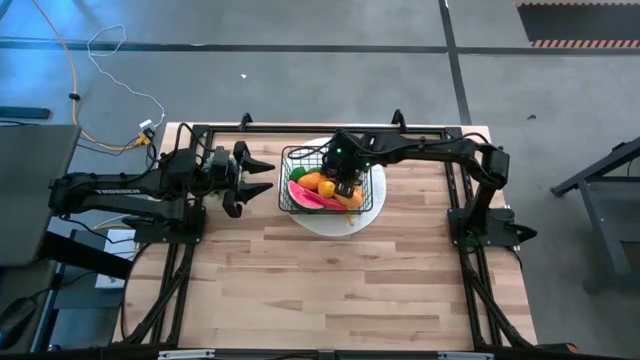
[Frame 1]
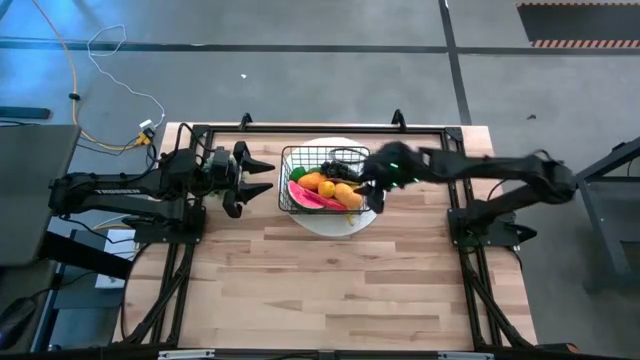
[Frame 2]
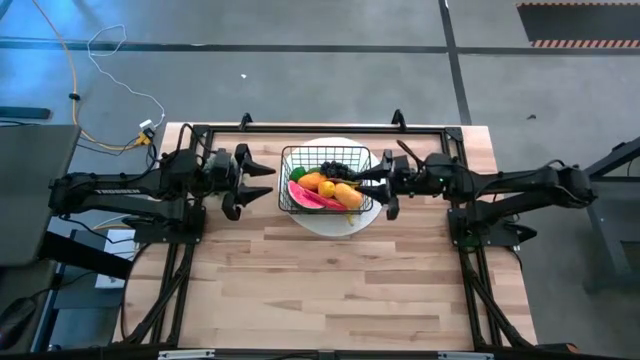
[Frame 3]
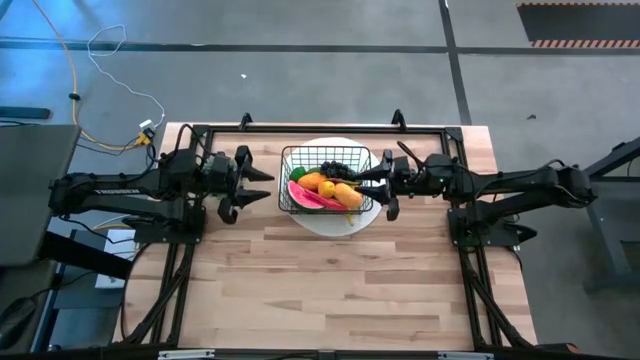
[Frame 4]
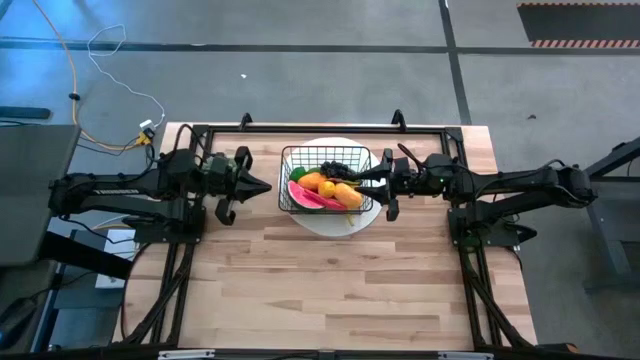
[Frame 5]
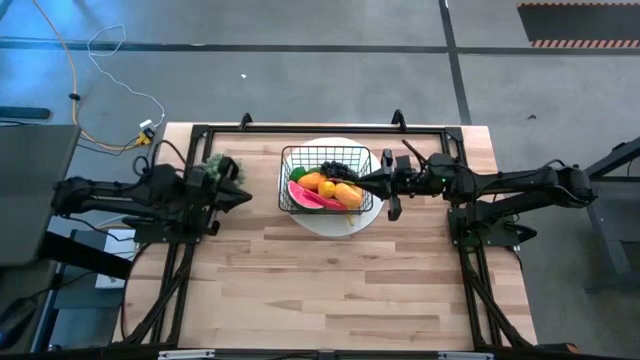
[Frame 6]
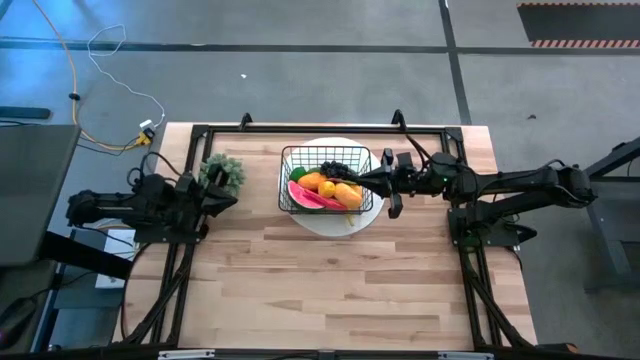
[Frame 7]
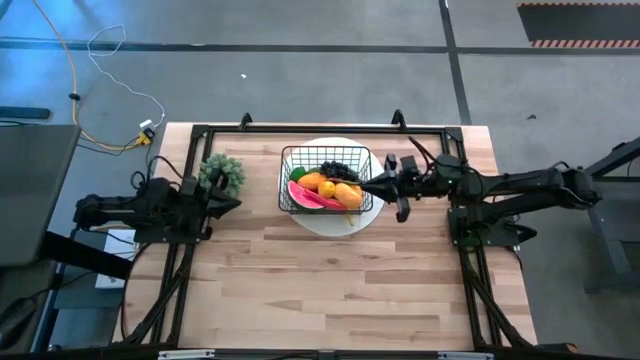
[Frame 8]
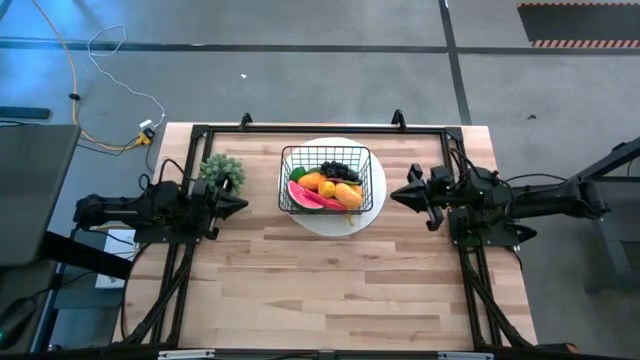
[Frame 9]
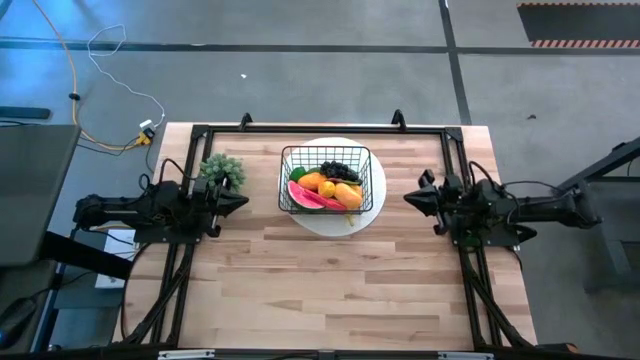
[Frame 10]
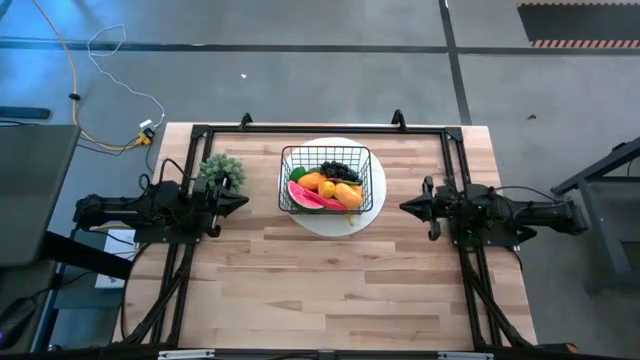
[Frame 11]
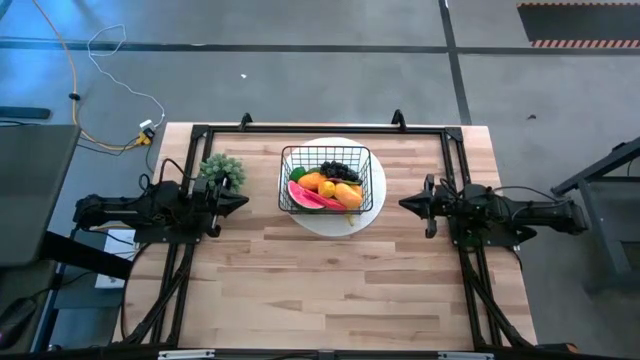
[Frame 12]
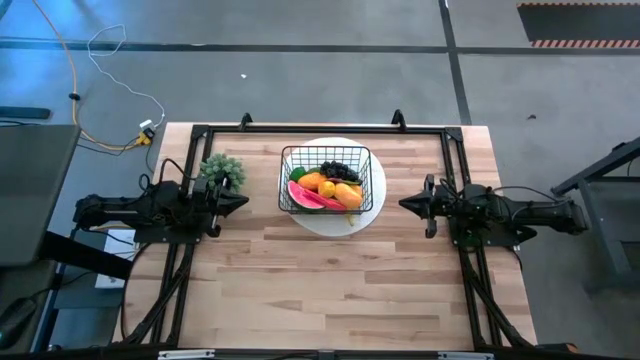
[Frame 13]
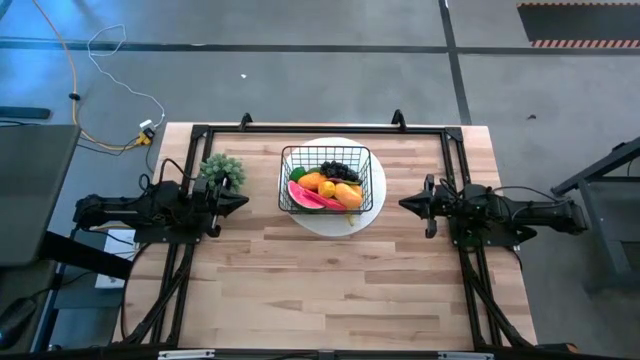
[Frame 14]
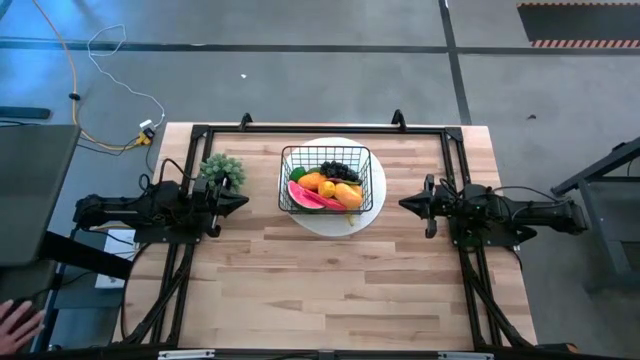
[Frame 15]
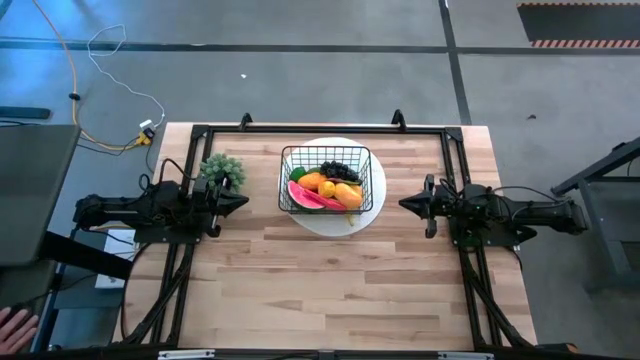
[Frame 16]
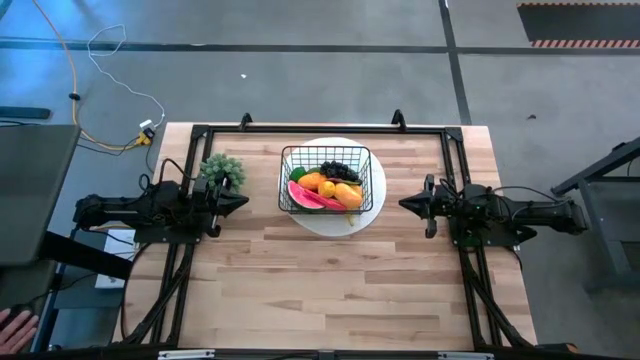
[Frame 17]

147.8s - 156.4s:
Task: Build produce basket
Return to Home Position

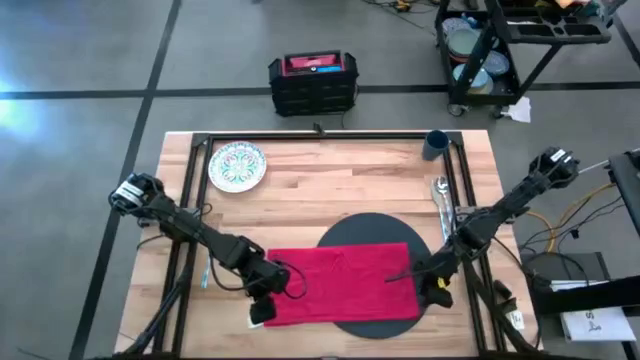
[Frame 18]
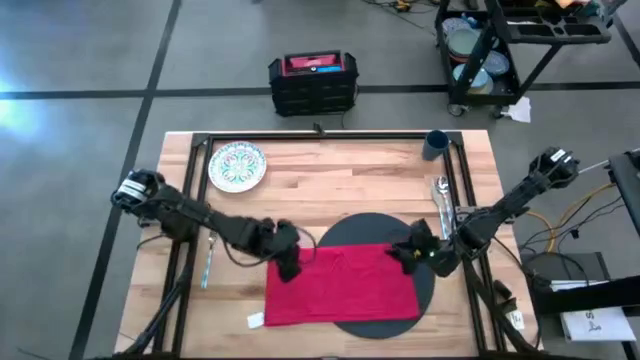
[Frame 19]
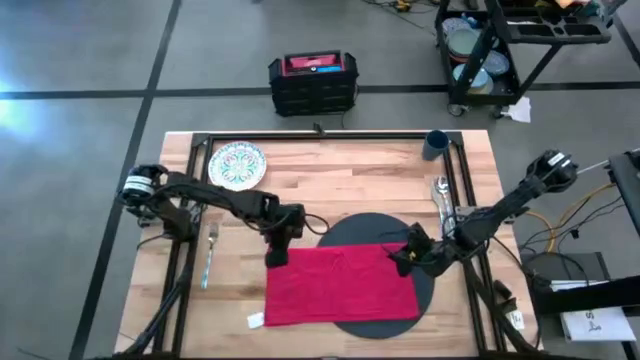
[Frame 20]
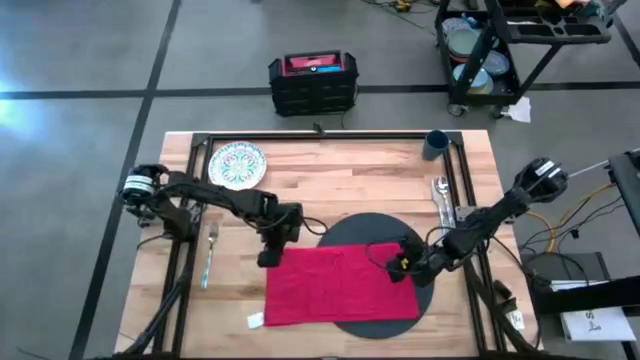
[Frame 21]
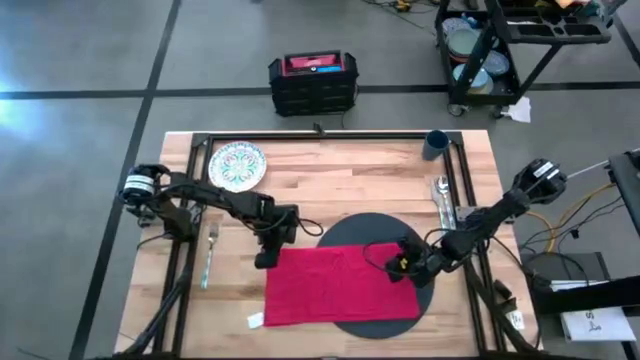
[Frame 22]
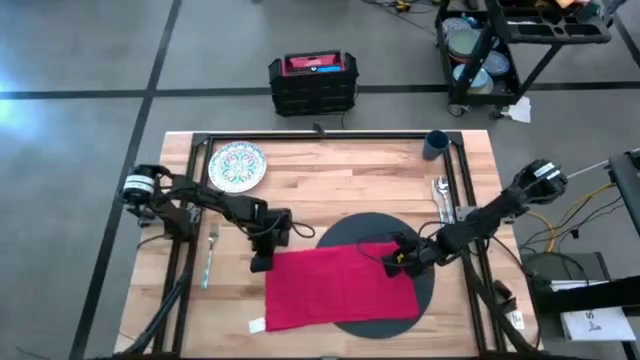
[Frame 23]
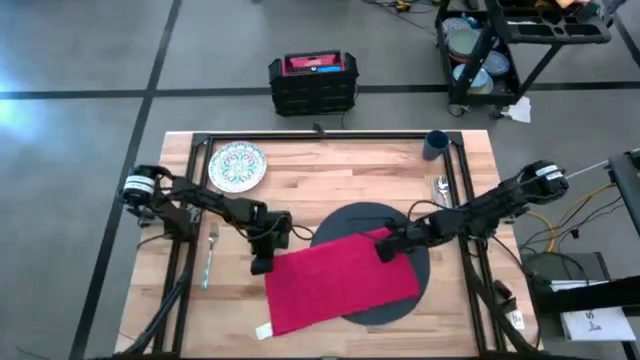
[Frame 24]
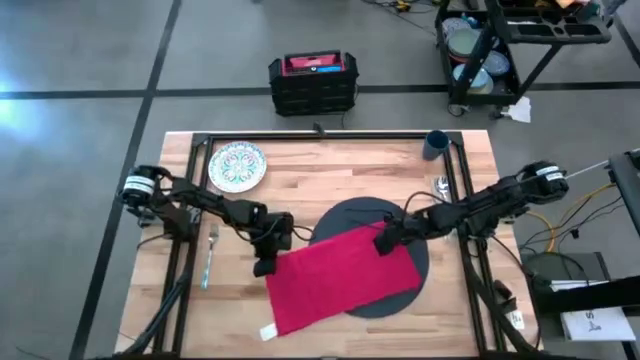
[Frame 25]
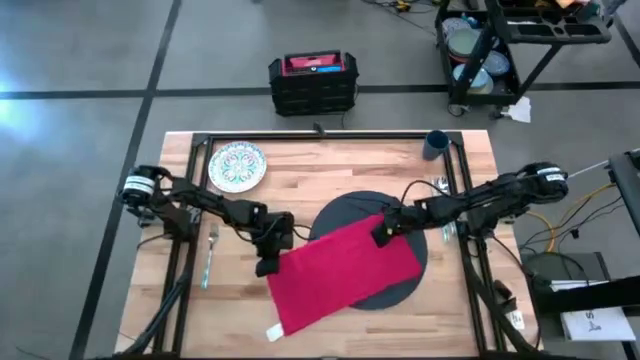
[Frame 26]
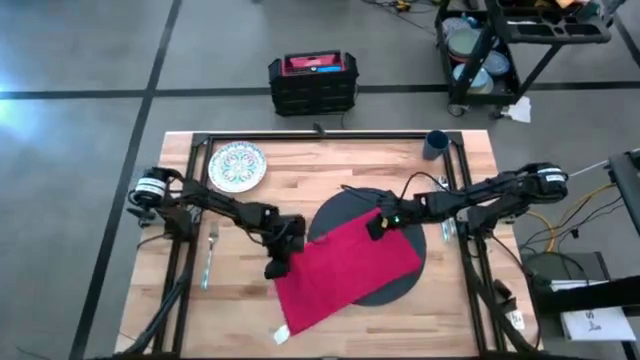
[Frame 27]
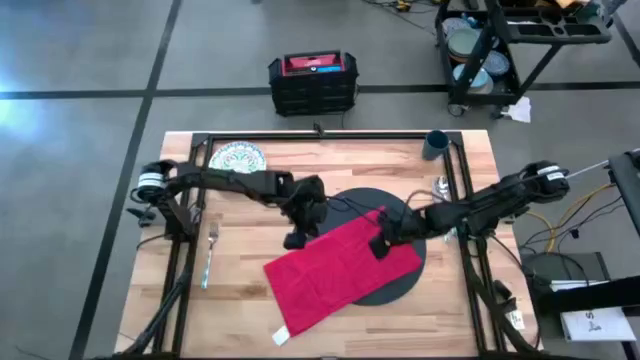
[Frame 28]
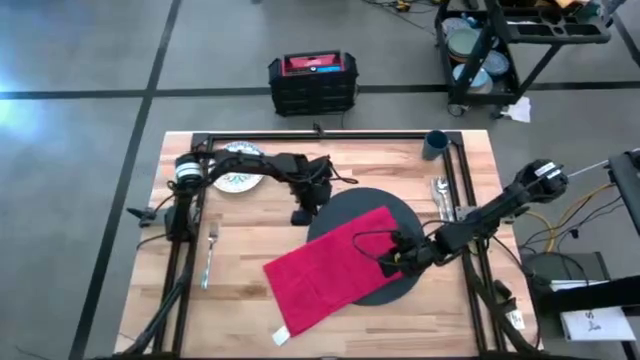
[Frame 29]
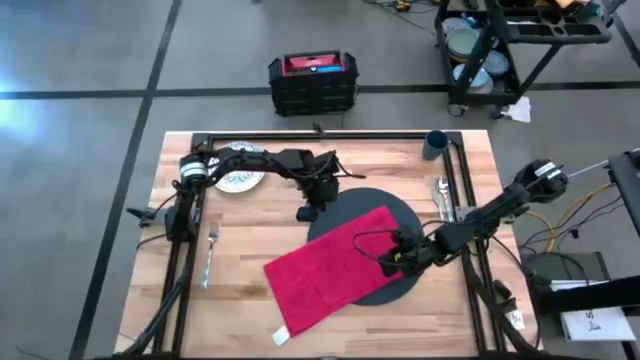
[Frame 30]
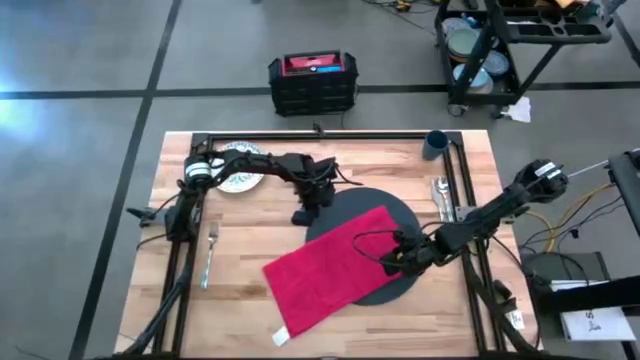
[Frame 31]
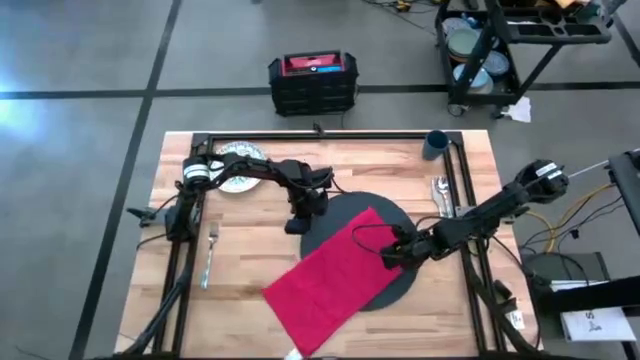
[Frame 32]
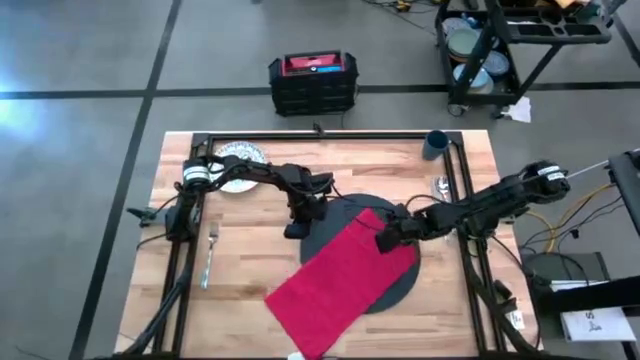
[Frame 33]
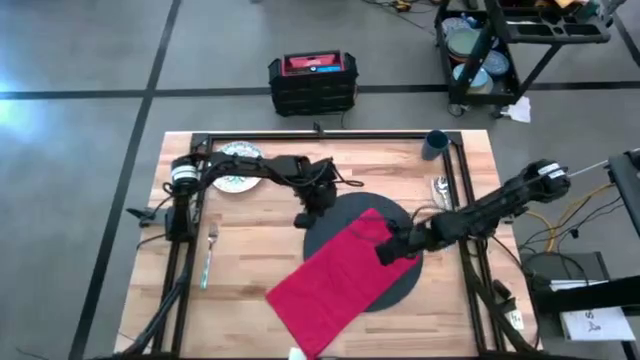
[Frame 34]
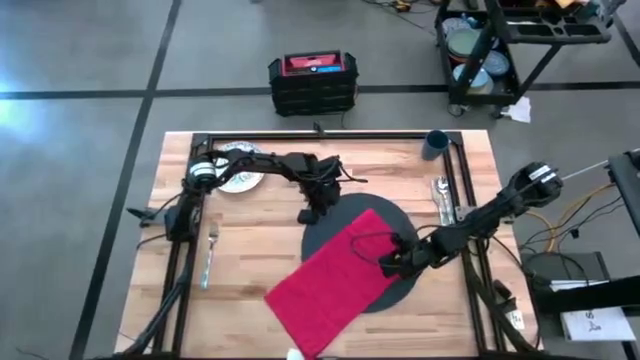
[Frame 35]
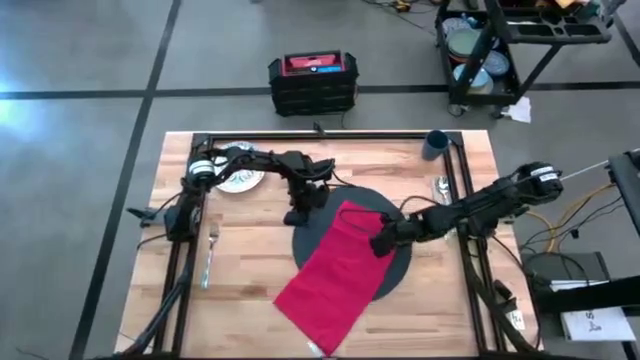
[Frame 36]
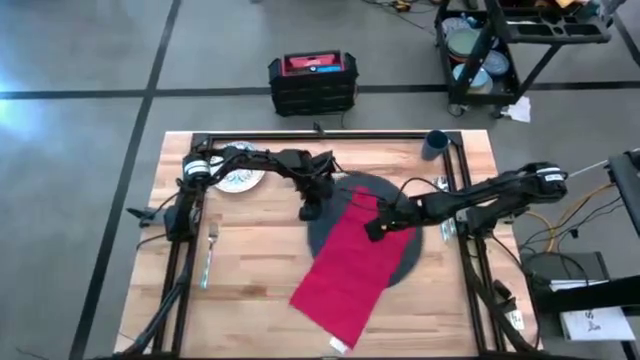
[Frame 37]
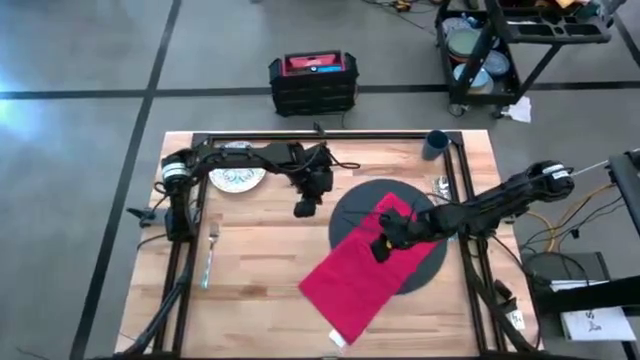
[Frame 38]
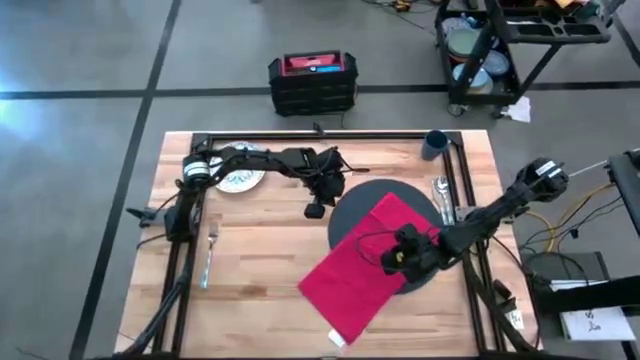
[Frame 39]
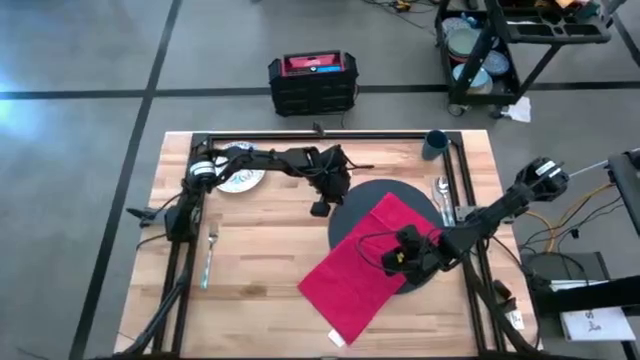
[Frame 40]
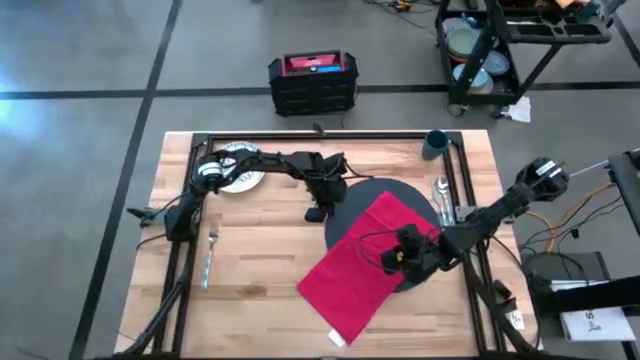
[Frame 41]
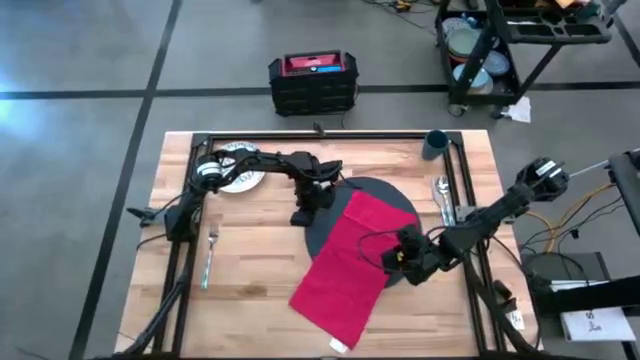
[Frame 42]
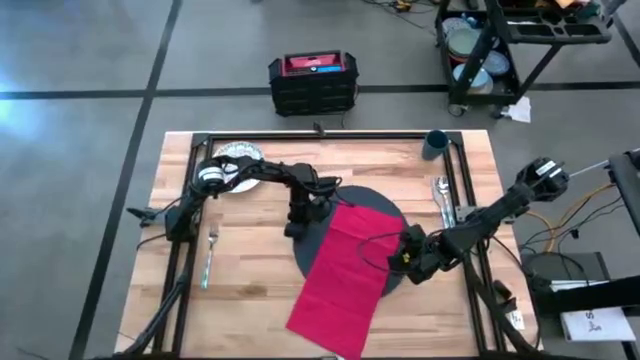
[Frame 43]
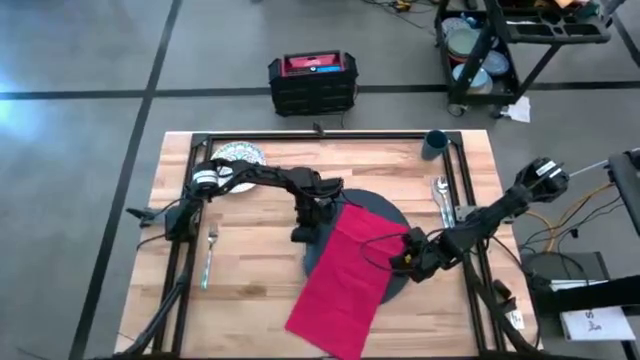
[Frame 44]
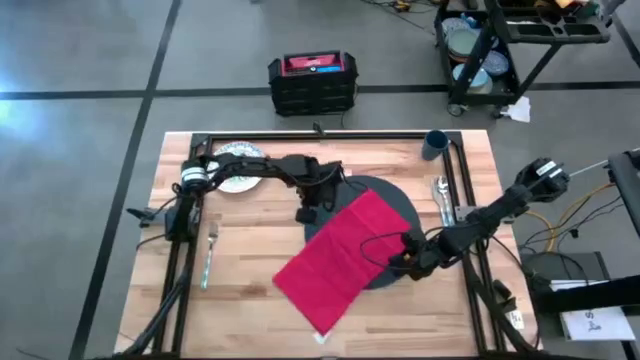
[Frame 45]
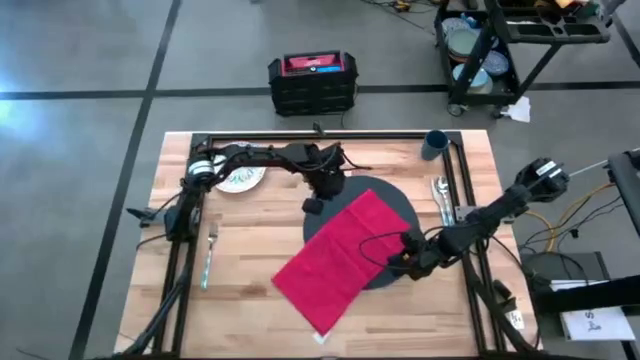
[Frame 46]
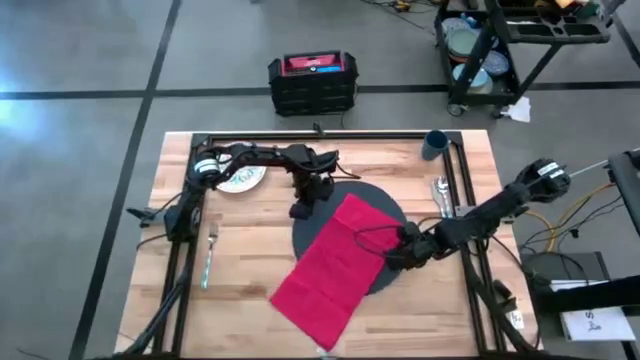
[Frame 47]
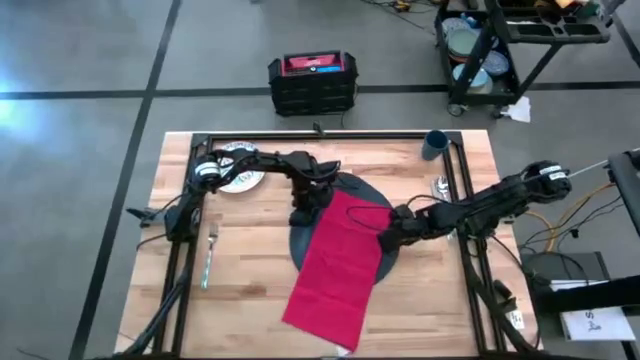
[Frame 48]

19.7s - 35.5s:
Task: Set table place
Adjust the black placemat
